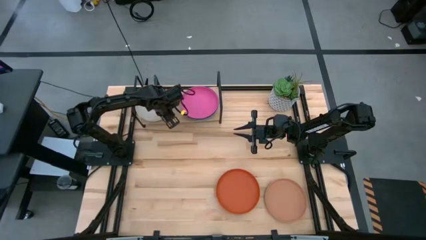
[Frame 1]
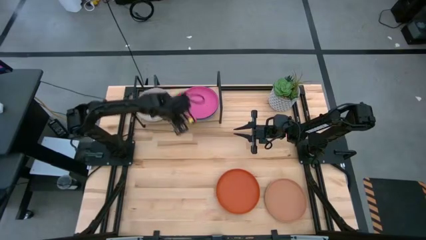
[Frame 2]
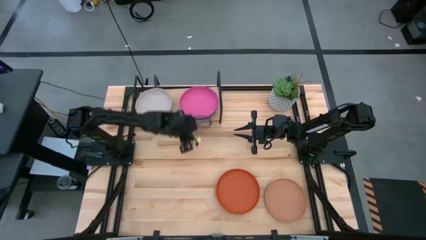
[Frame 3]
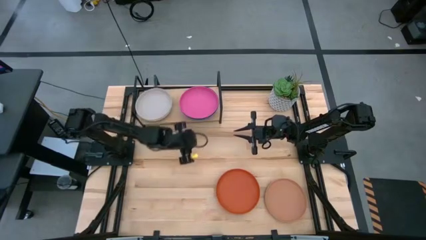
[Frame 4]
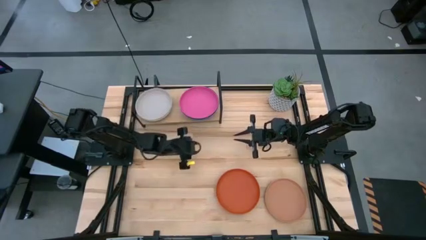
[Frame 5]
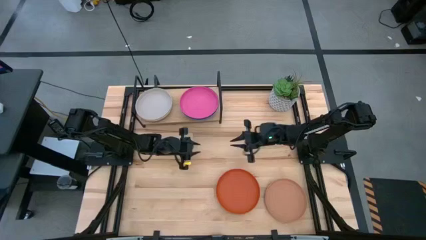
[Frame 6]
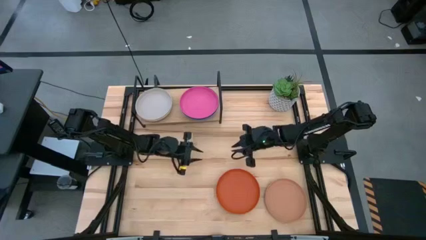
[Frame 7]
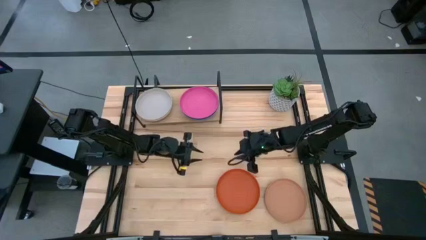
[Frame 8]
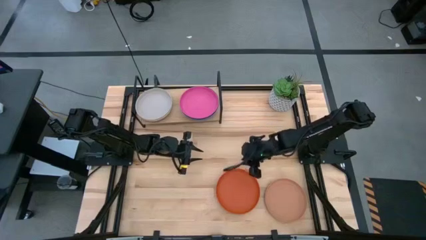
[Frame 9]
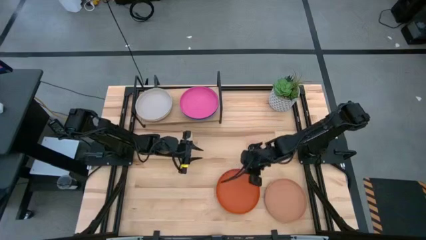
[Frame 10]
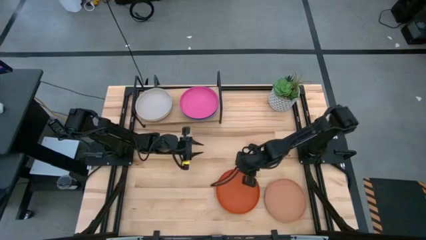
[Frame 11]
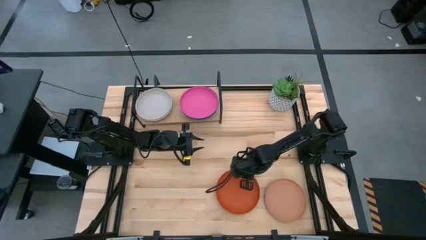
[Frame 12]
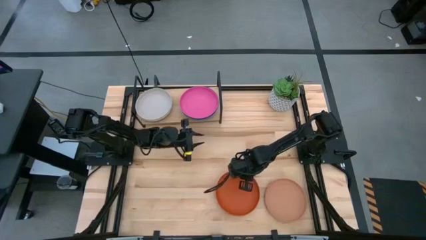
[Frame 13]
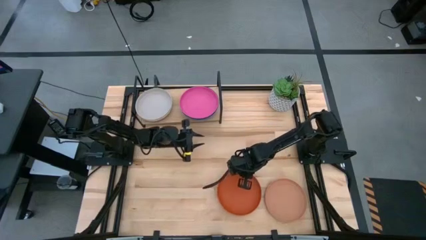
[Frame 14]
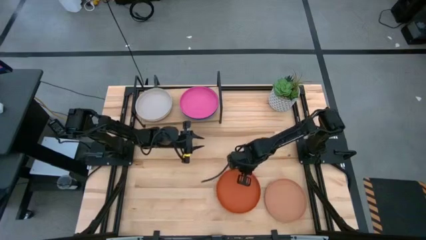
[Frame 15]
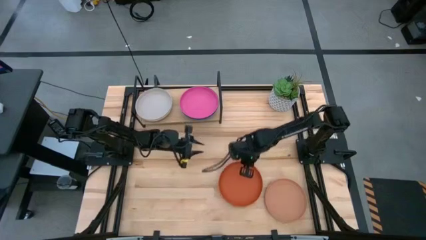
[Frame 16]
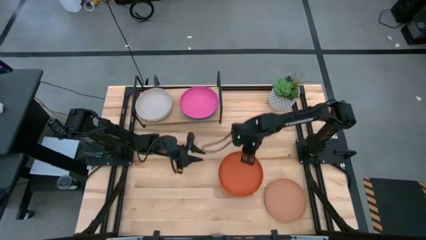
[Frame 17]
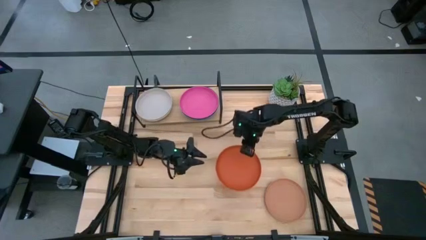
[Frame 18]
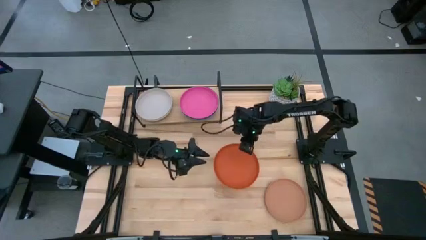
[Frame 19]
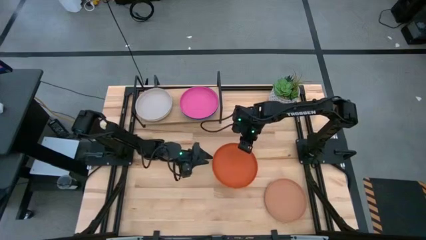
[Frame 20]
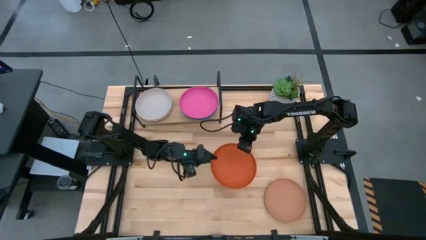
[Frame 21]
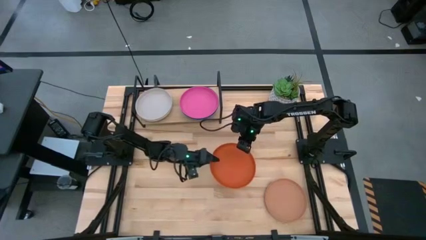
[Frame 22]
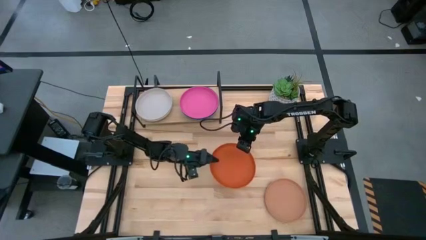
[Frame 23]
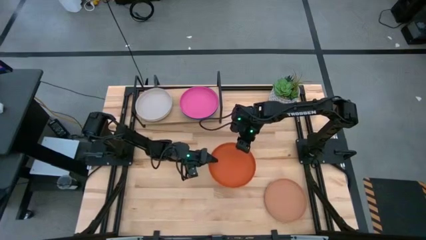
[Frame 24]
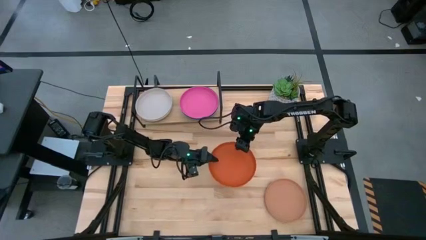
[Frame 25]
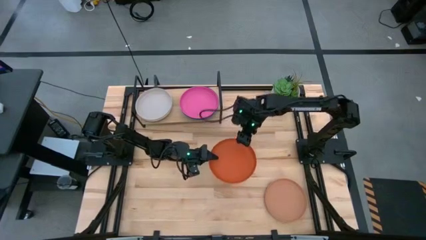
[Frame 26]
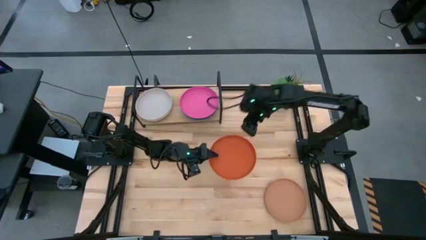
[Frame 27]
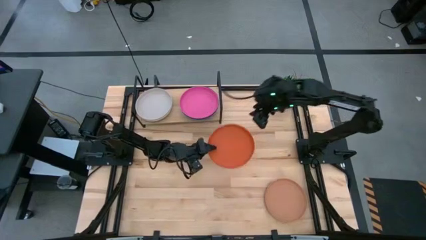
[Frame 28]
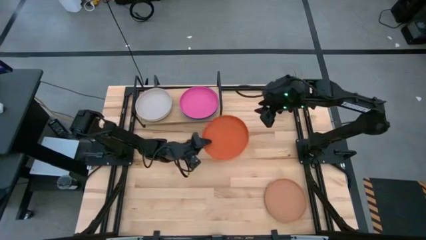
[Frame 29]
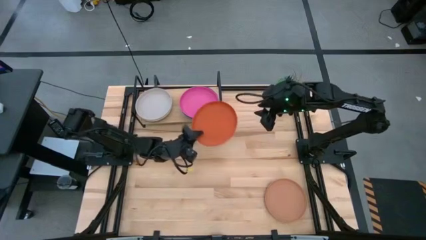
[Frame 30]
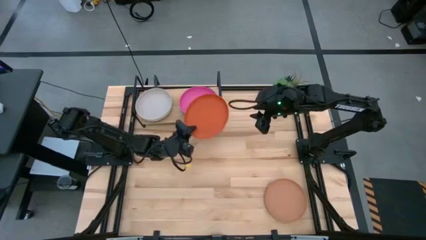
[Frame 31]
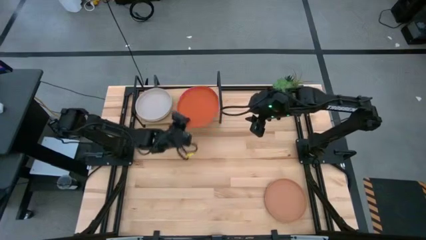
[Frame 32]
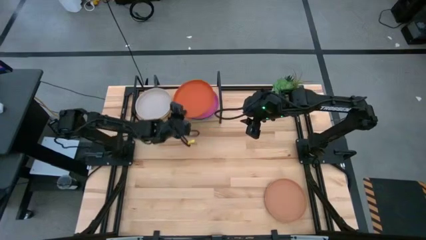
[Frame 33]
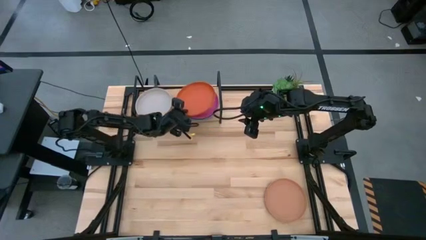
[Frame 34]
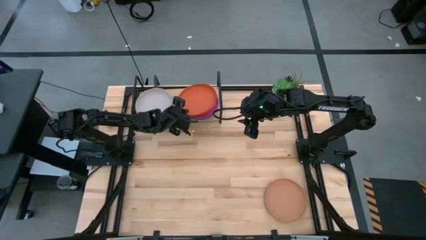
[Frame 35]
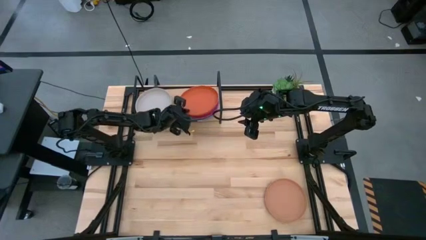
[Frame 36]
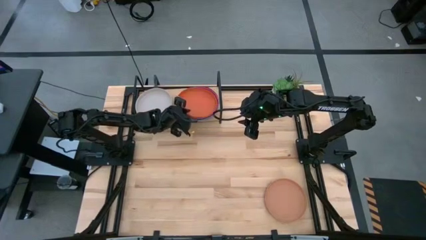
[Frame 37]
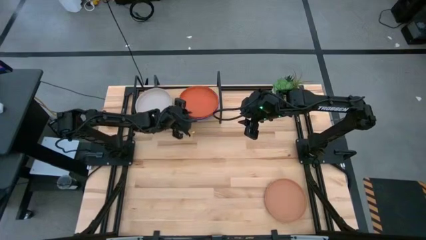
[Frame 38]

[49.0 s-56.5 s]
Task: Place and stack plates onto a shelf
Stack the orange plate on top of the pink plate on the shelf

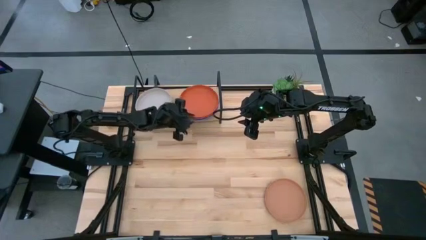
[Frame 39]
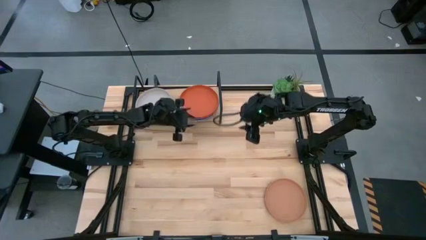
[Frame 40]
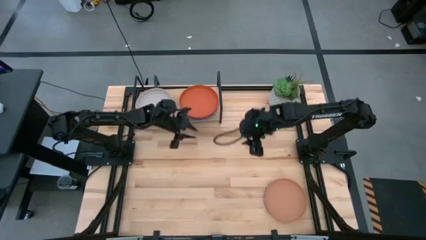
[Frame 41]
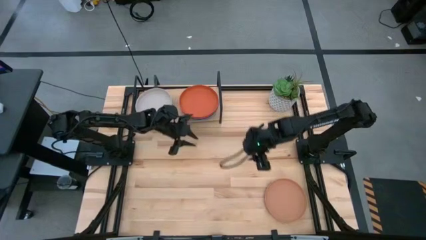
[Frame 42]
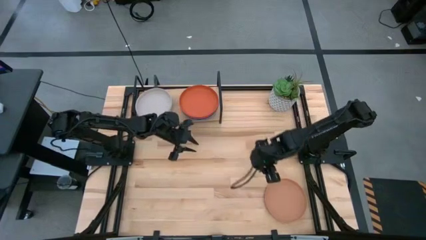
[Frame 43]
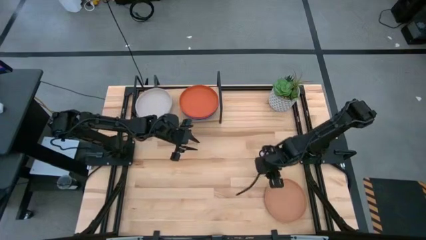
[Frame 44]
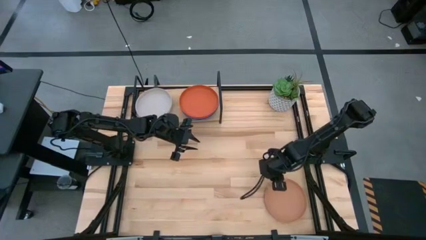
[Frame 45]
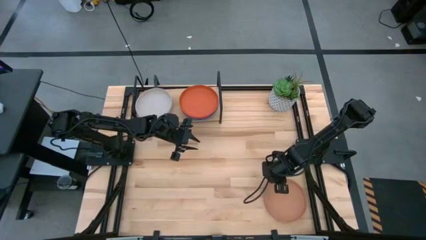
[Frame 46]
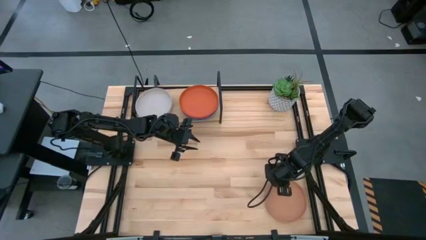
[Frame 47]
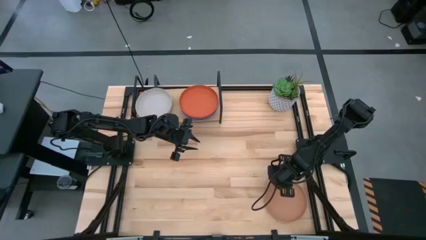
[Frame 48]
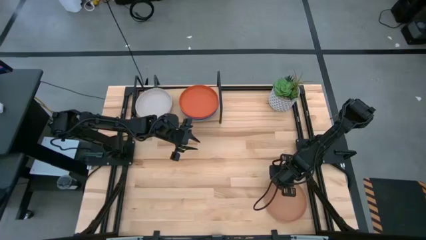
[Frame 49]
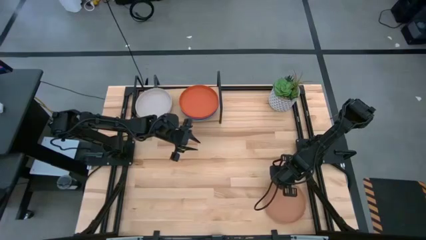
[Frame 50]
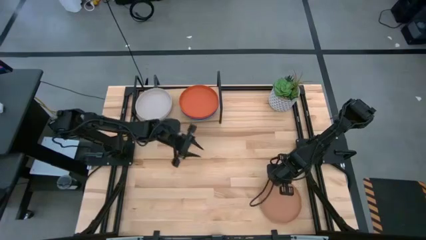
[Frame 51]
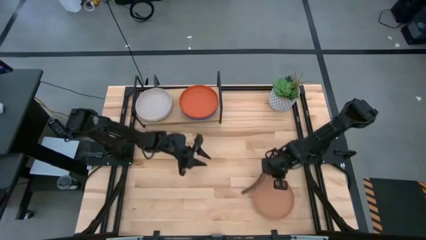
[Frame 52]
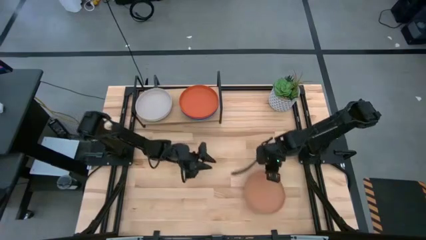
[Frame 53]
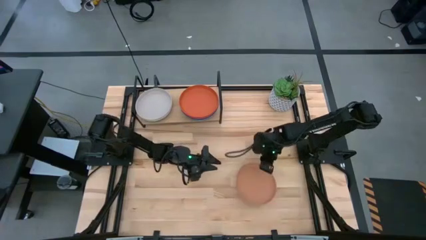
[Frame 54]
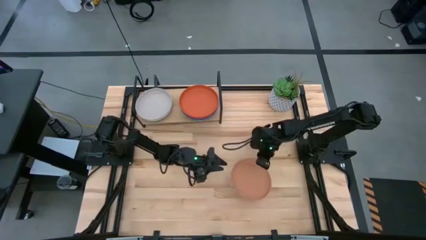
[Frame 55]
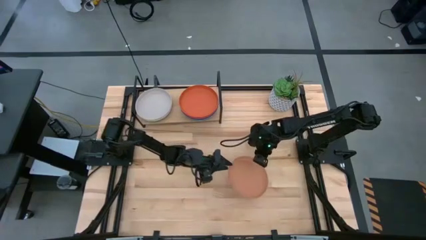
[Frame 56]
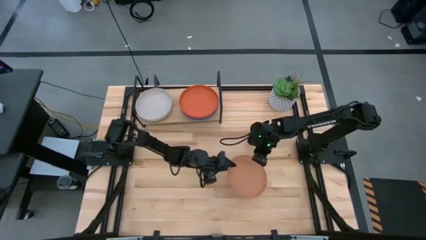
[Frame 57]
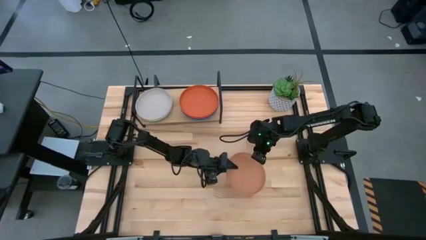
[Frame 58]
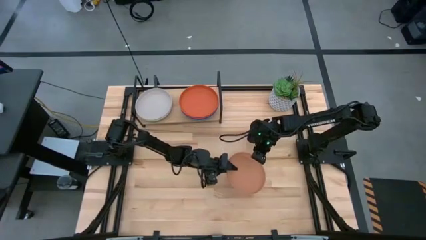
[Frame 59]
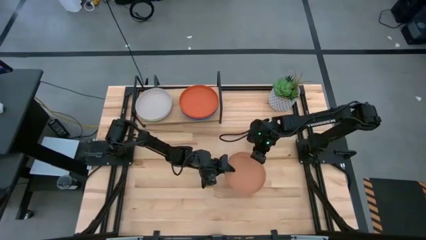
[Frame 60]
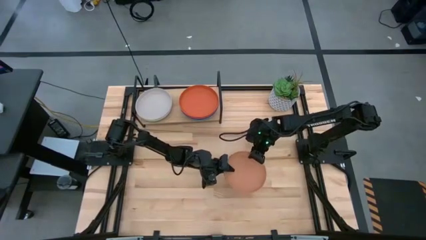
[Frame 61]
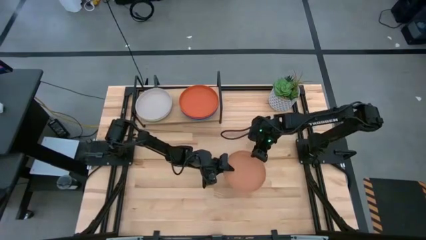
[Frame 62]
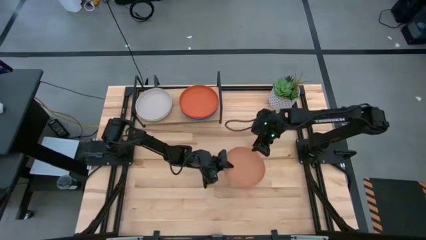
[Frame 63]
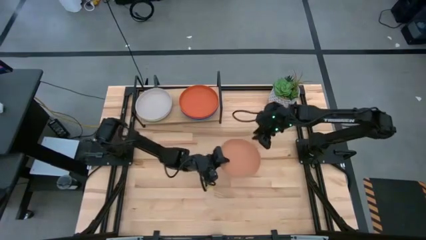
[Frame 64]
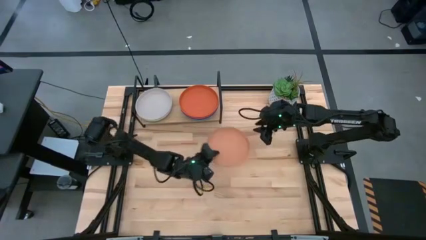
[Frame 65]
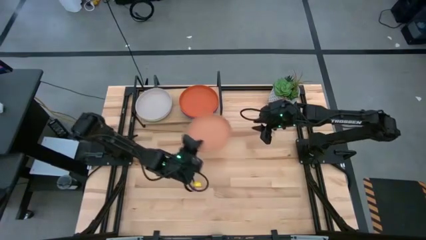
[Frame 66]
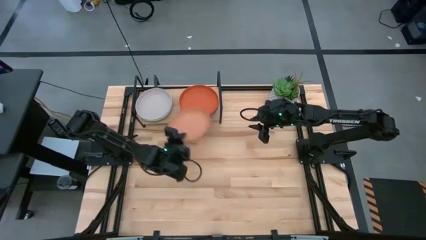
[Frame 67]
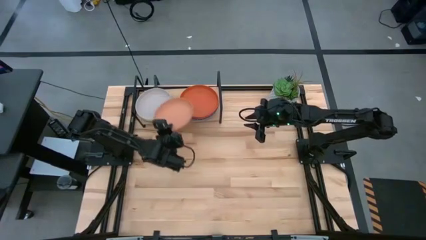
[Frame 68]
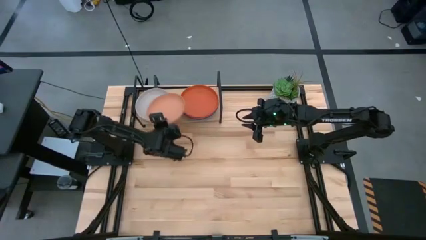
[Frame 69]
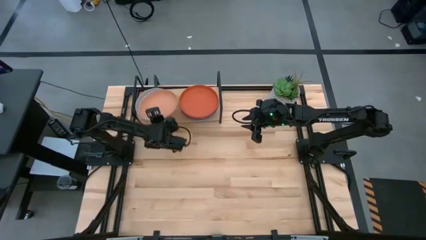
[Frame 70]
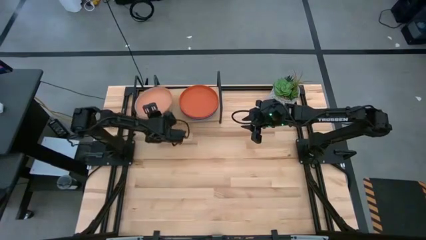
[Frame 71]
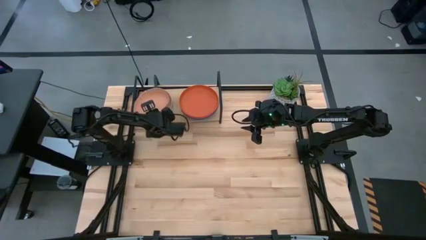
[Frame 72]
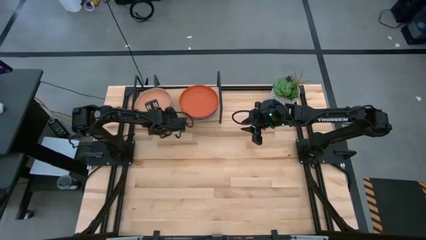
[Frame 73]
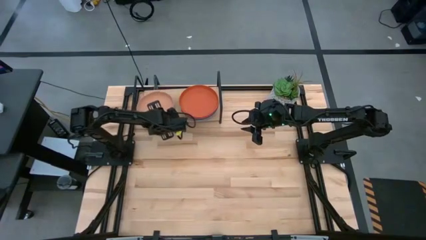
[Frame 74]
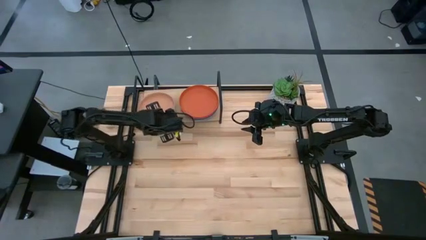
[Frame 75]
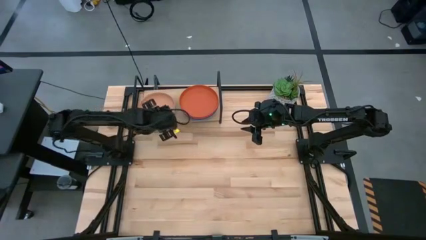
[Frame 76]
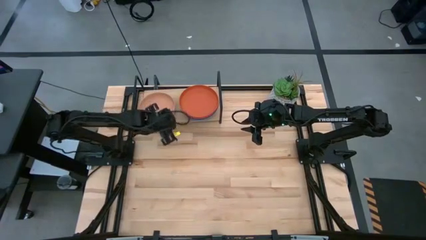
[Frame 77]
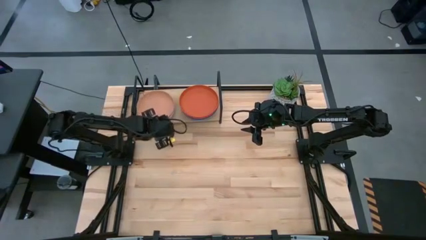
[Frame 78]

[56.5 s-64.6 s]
Stack the brown plate on top of the gray plate on the shelf
